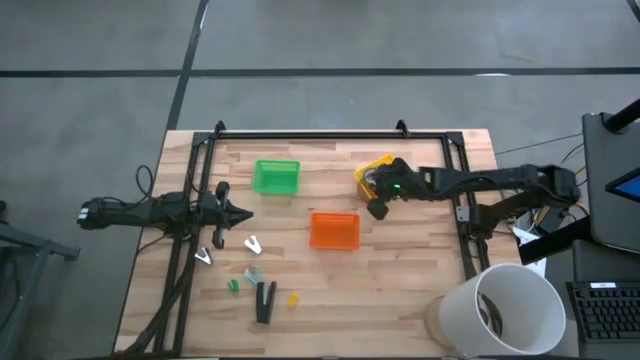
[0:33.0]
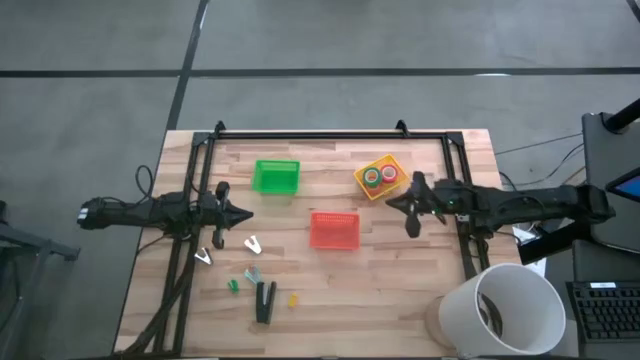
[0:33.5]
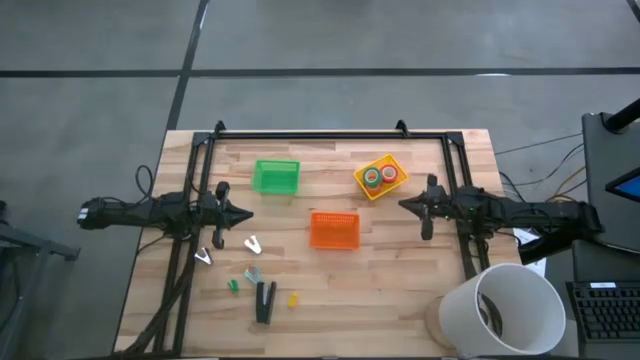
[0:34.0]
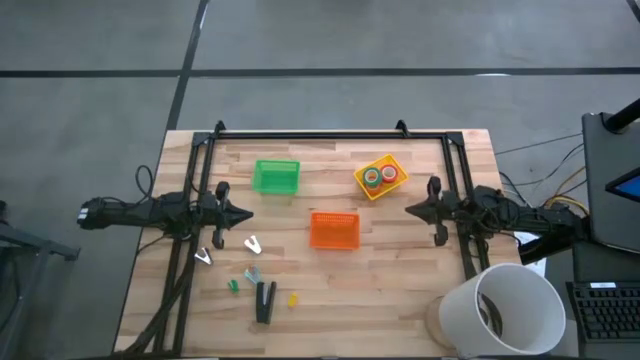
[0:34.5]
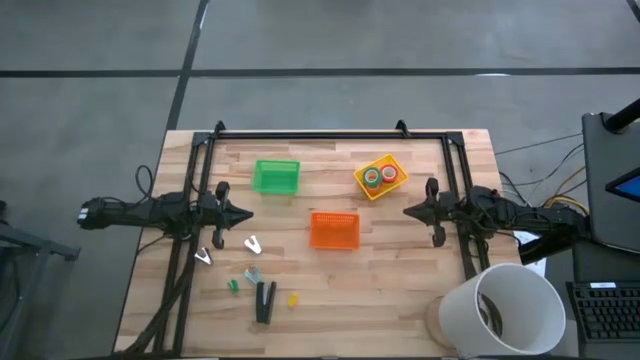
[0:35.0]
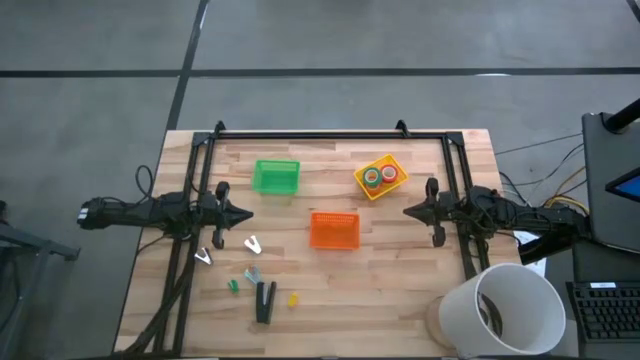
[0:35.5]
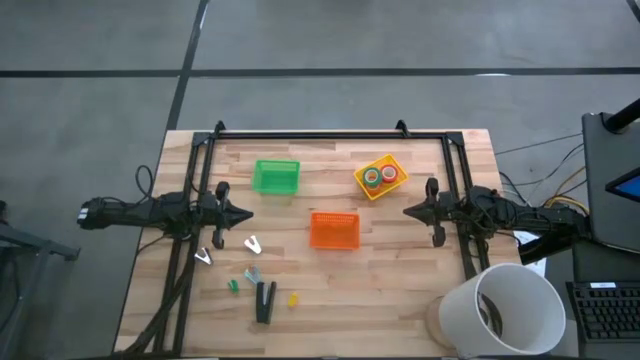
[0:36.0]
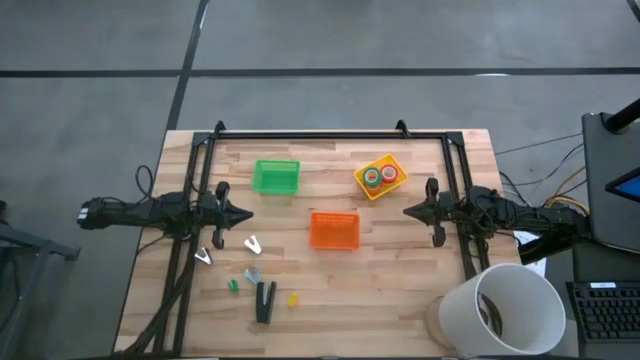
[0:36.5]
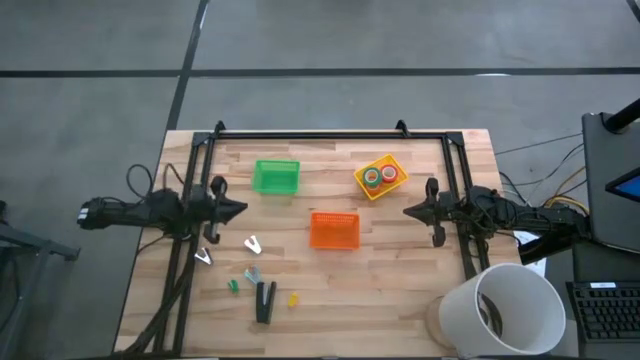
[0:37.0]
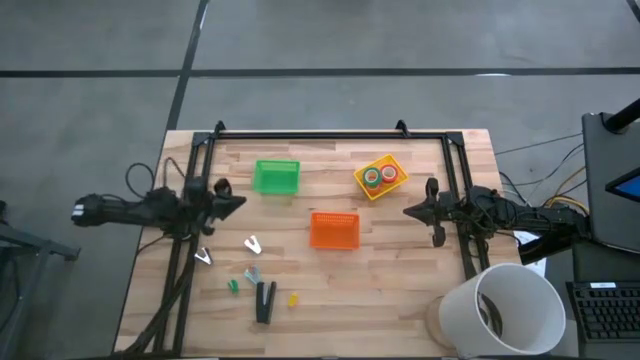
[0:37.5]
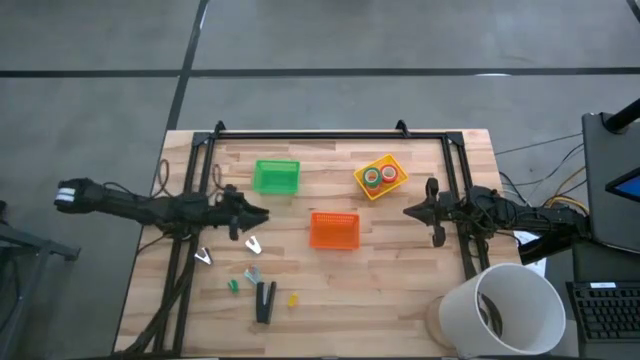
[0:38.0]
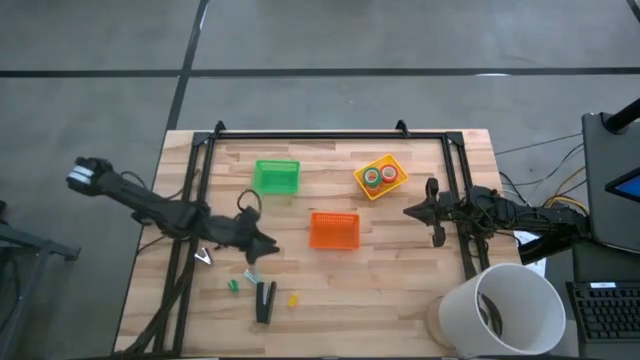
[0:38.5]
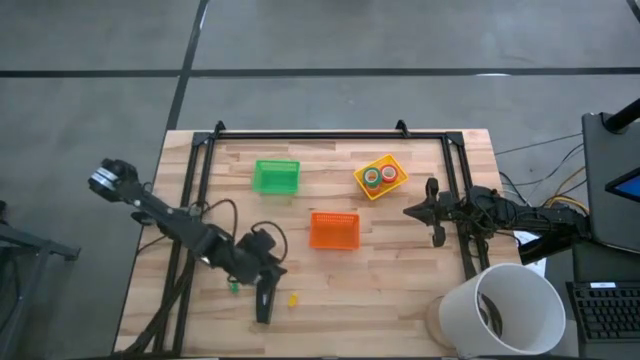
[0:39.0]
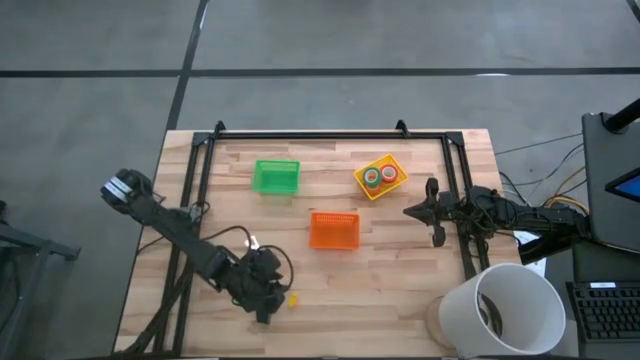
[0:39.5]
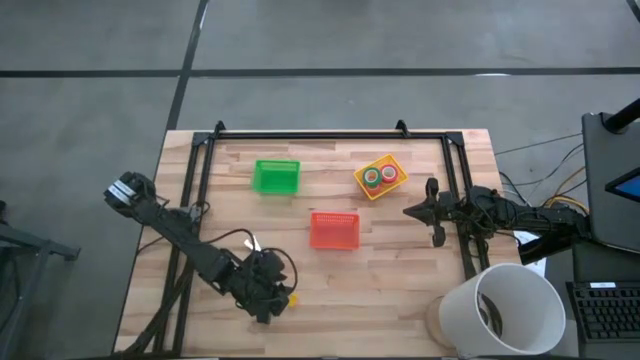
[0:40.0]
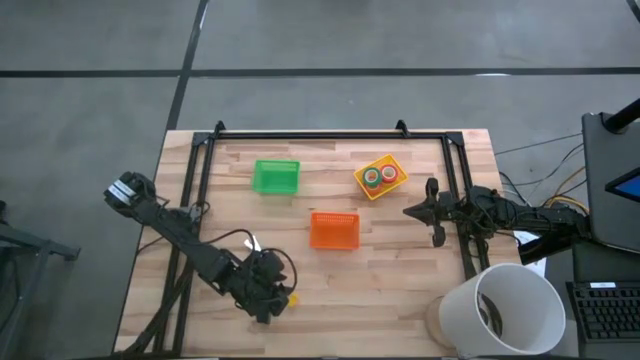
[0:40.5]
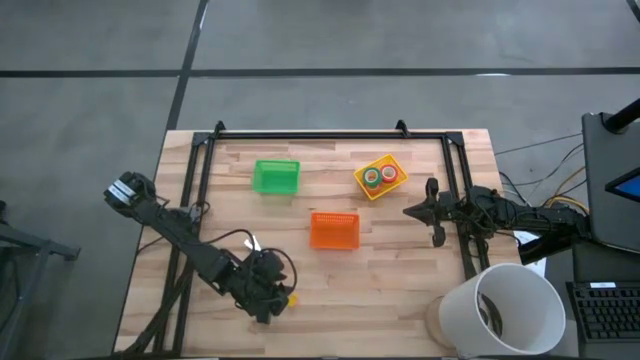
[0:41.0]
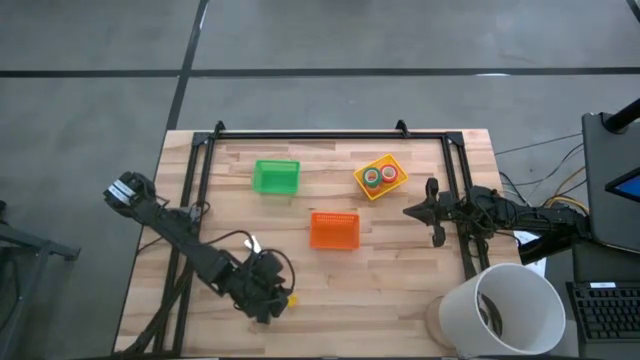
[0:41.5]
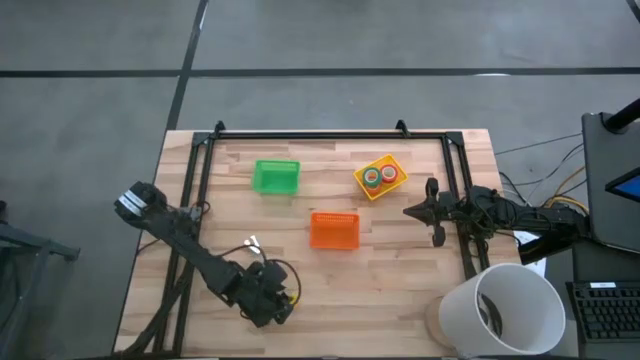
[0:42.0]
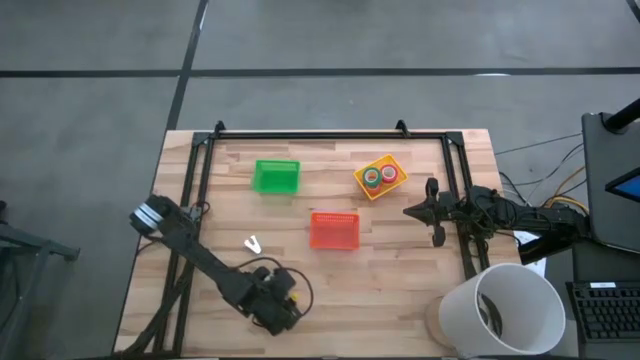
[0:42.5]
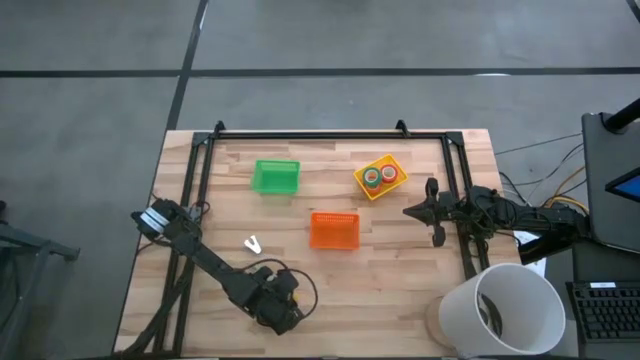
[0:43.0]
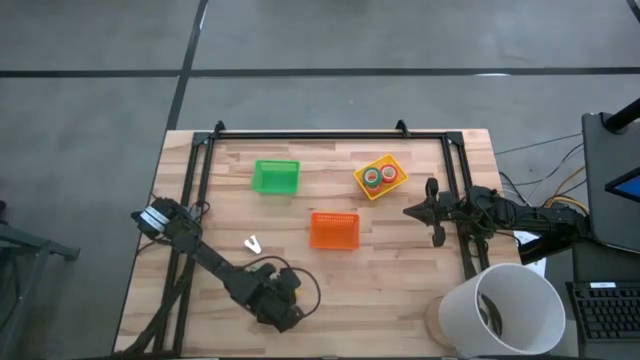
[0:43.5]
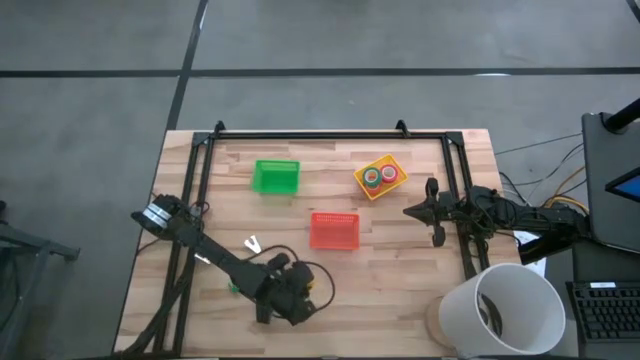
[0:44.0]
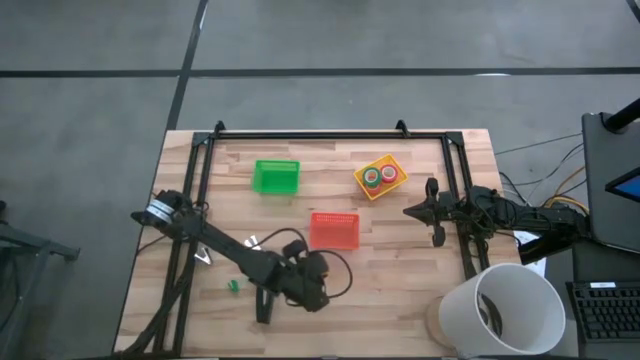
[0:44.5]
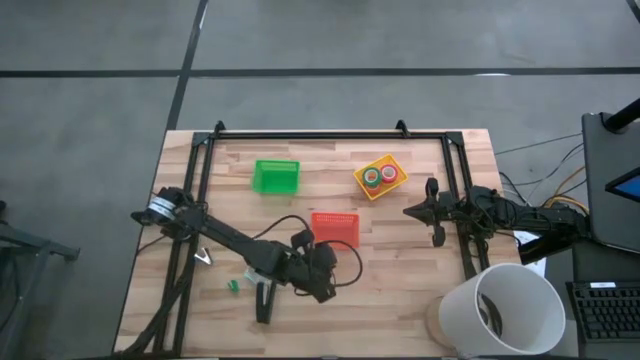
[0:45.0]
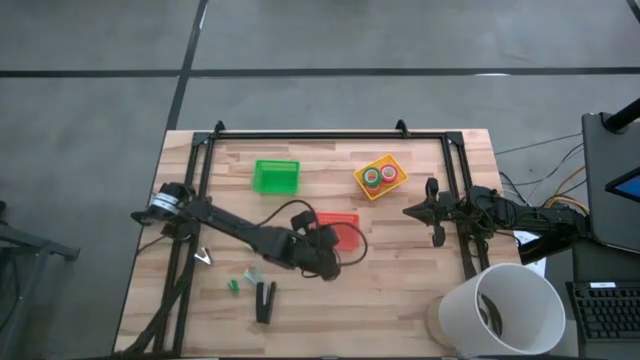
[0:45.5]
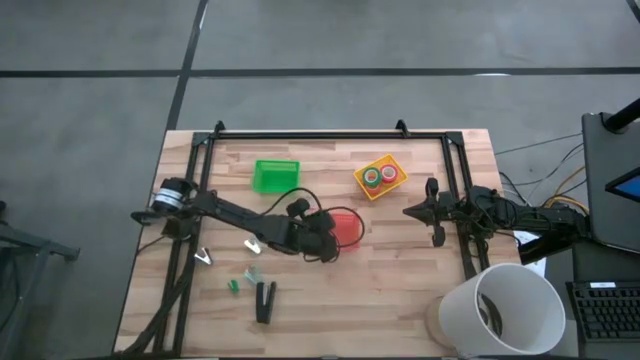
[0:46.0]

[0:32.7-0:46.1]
Task: Pick and place Stapler, Stapler remover, tape
Put the small yellow stapler into the orange bin

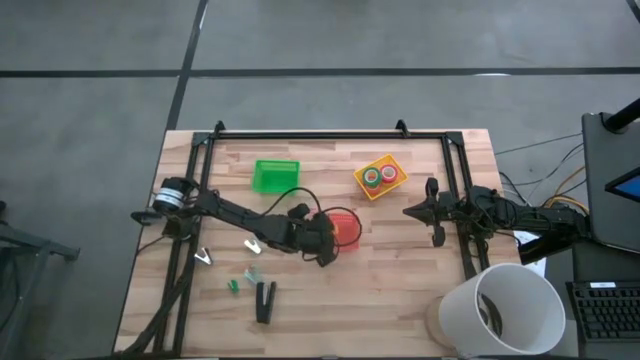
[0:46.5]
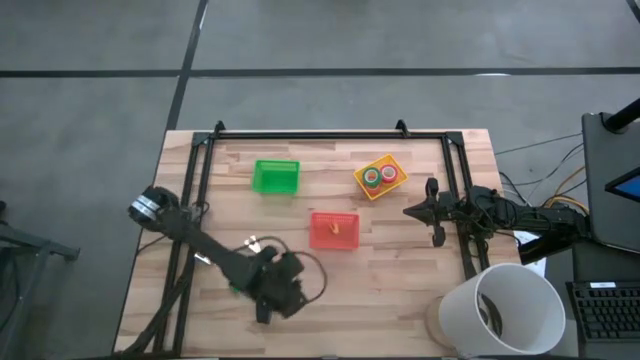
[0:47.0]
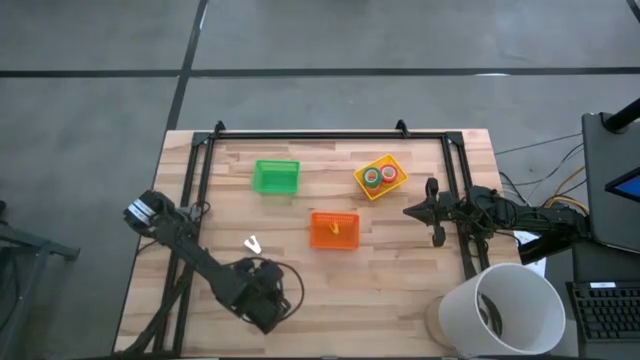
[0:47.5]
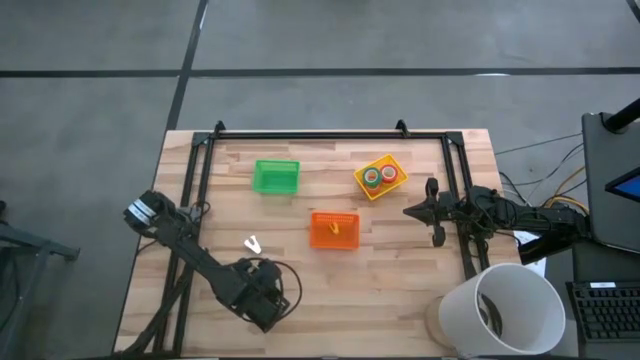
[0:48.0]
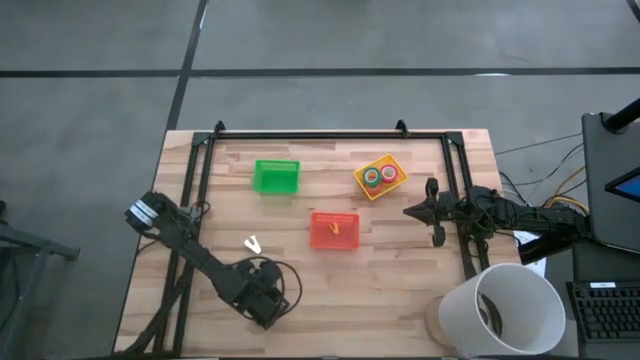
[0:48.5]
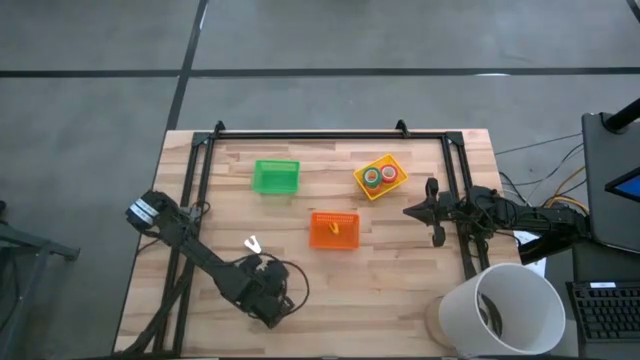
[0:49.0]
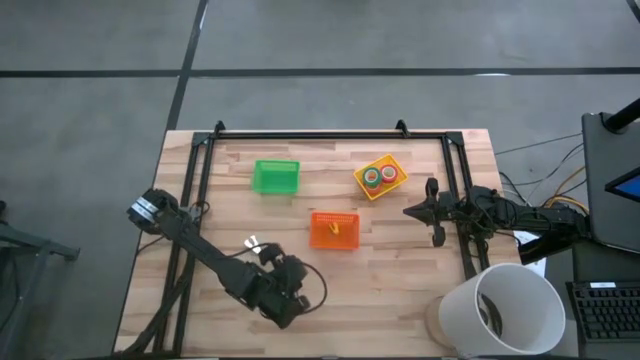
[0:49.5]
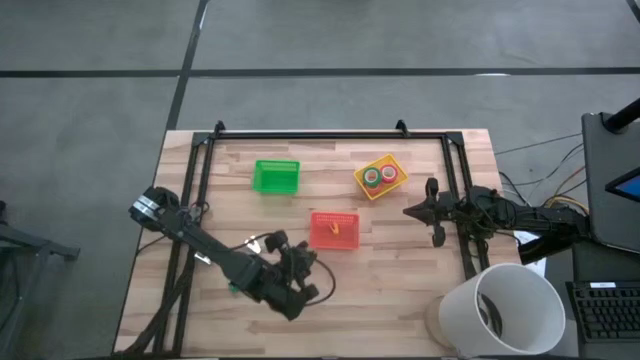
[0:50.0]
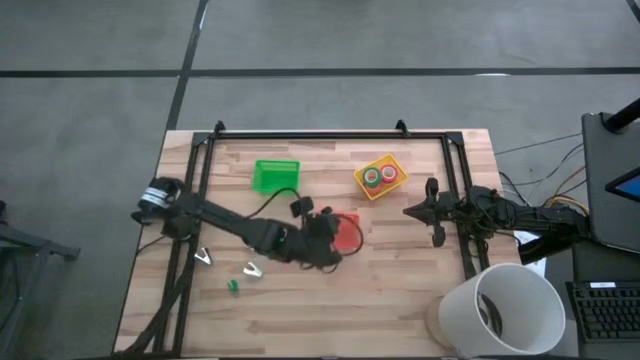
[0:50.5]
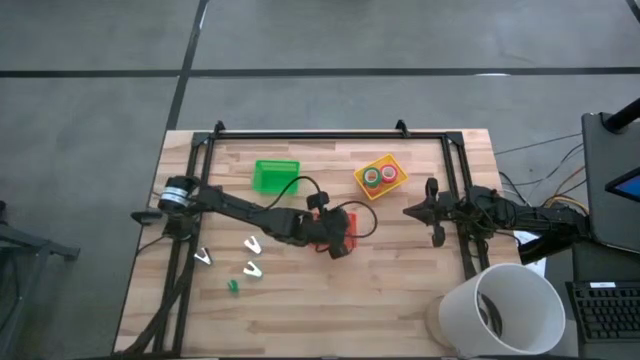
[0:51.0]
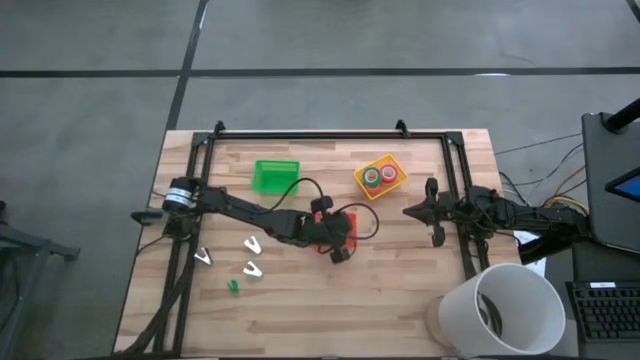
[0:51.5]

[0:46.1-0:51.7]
Put the big black stapler into the orange bin

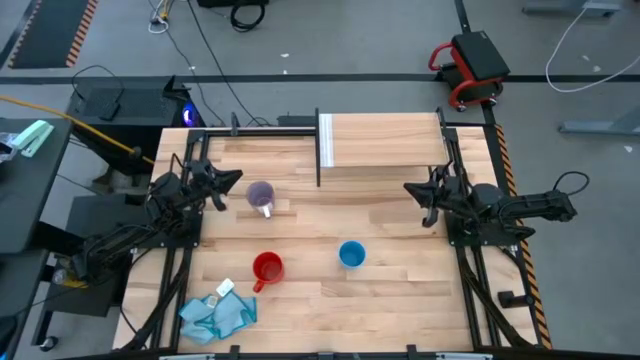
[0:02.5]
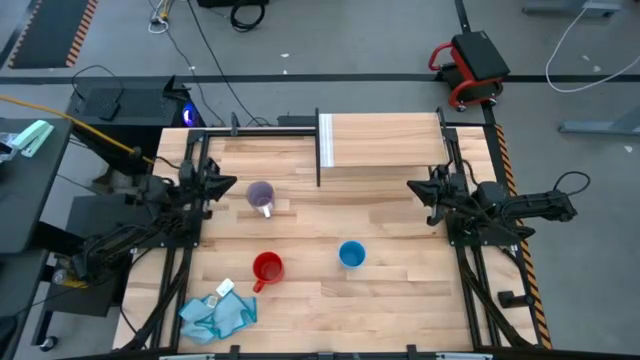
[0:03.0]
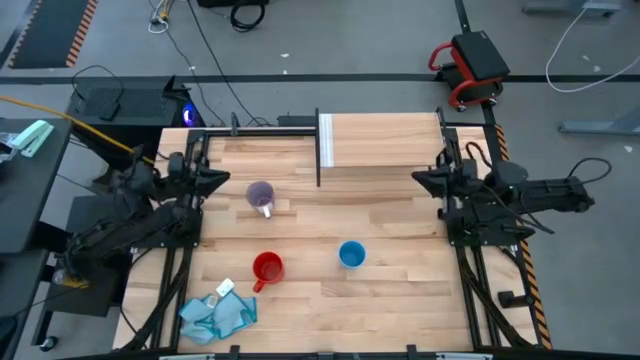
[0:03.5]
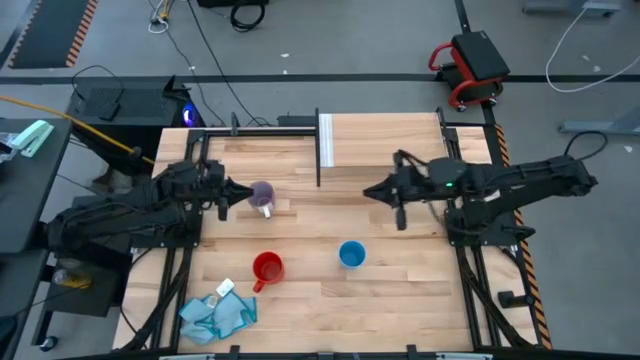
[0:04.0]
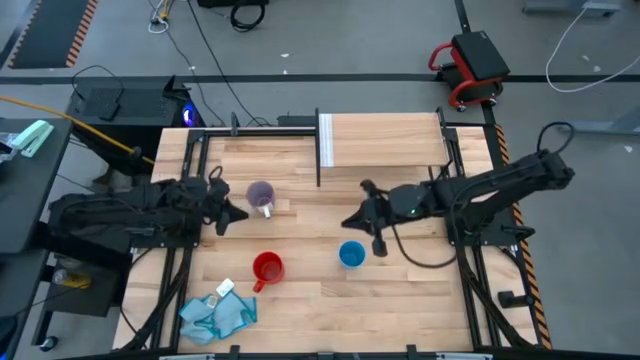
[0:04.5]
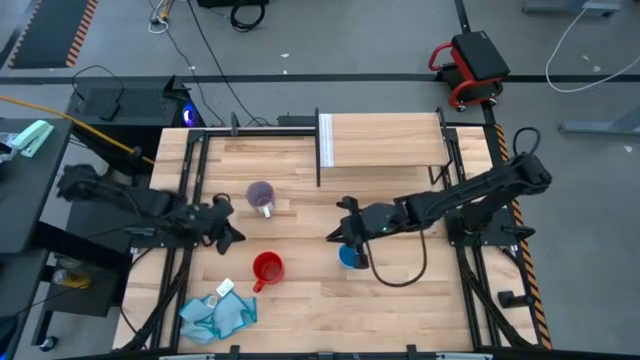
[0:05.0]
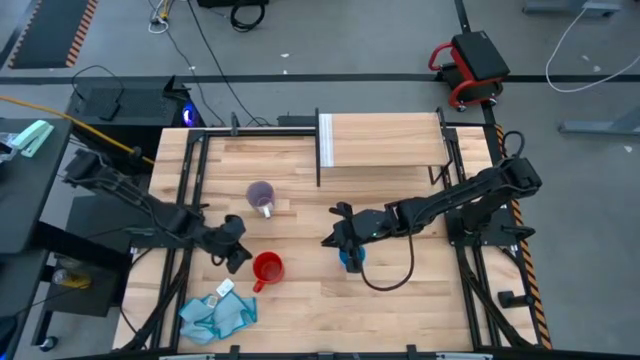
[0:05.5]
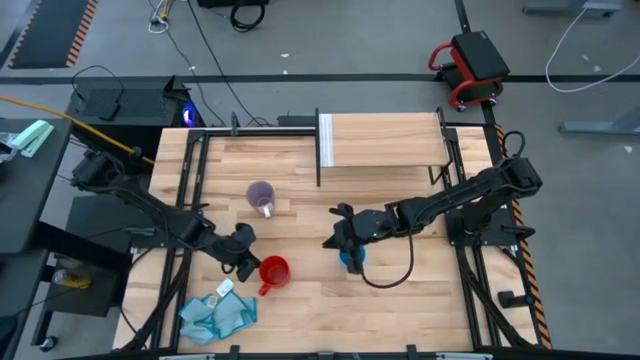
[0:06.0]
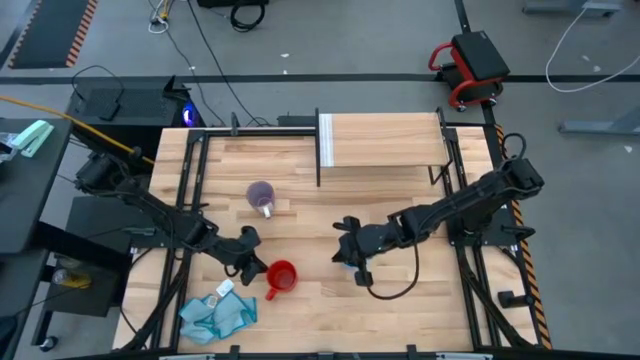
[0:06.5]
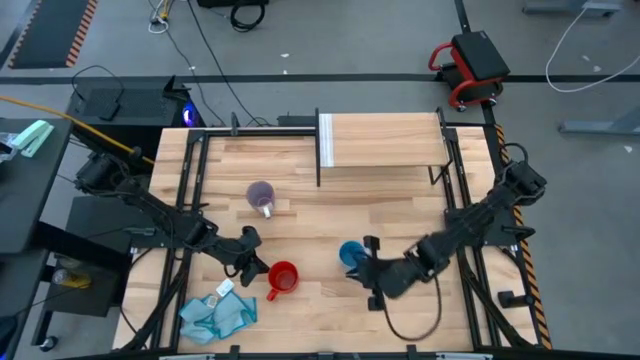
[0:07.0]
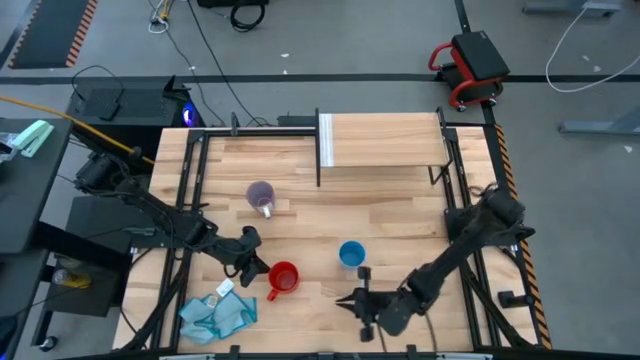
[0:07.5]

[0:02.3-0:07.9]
Task: Stack small to large cups/mugs on shelf
Move the red mug to the center of the table
